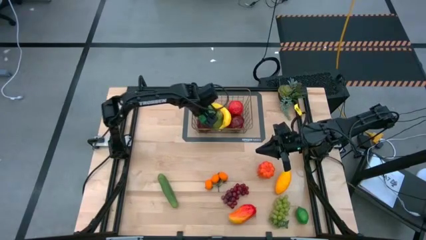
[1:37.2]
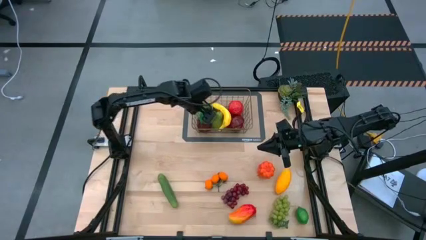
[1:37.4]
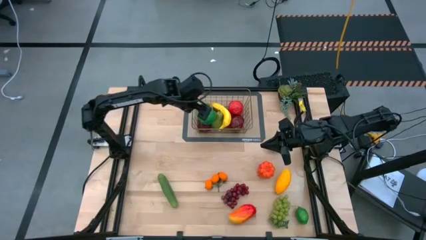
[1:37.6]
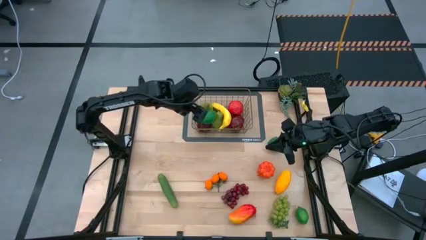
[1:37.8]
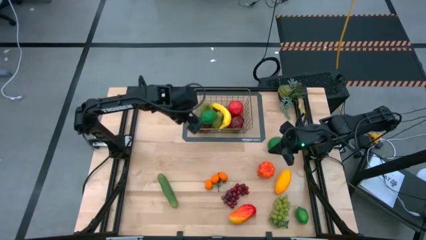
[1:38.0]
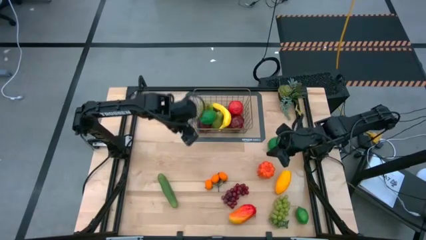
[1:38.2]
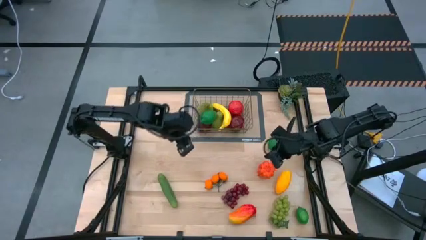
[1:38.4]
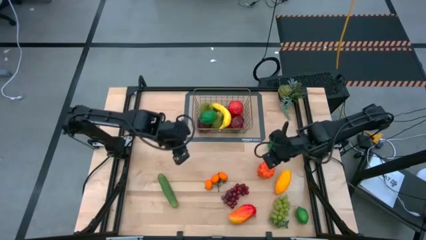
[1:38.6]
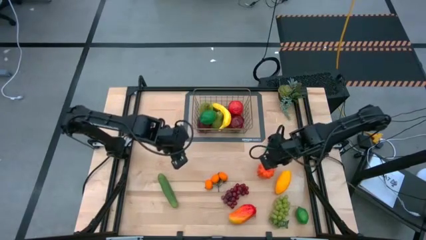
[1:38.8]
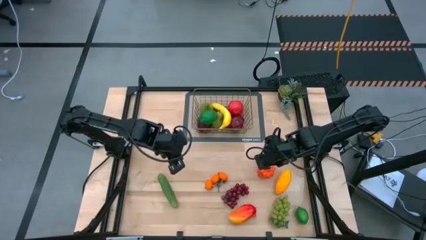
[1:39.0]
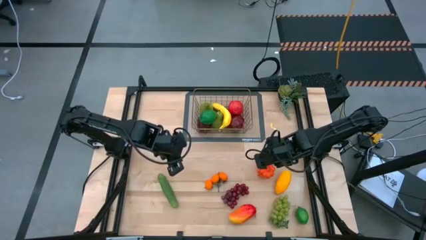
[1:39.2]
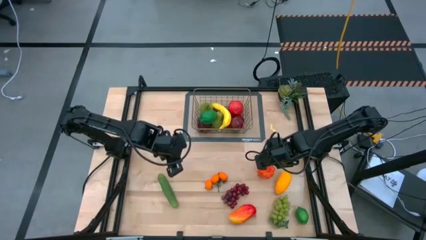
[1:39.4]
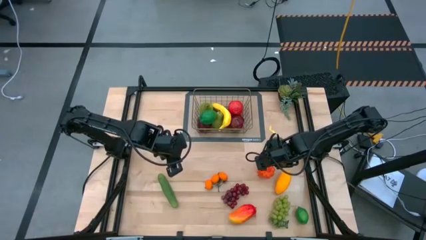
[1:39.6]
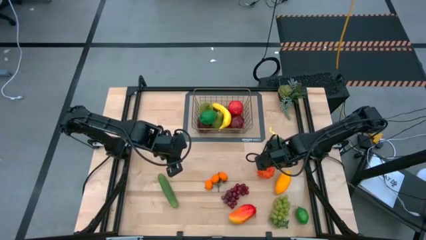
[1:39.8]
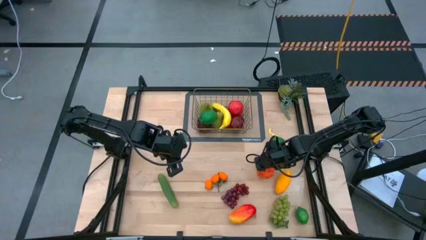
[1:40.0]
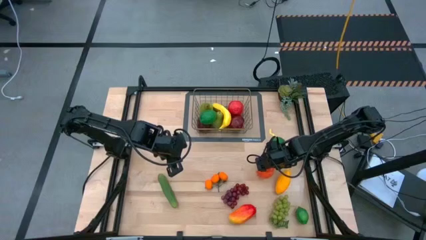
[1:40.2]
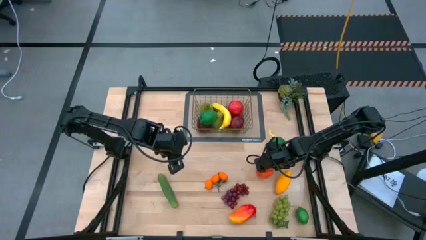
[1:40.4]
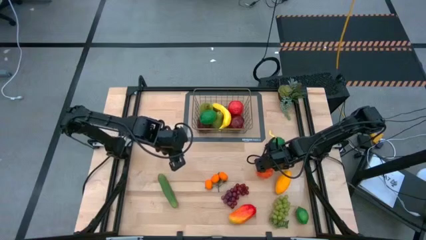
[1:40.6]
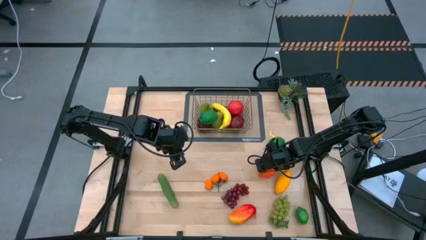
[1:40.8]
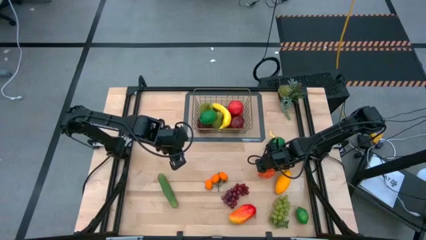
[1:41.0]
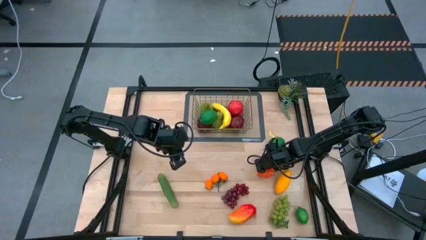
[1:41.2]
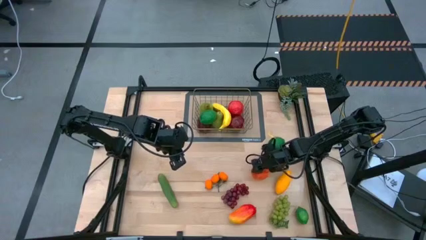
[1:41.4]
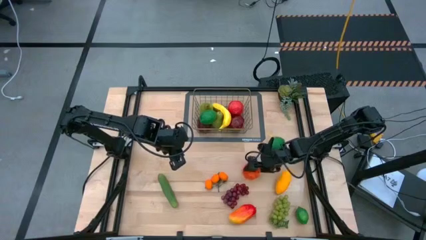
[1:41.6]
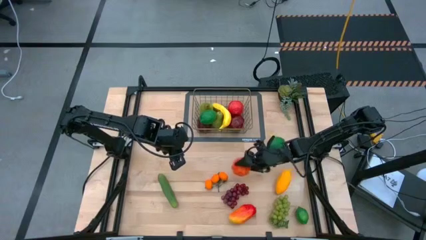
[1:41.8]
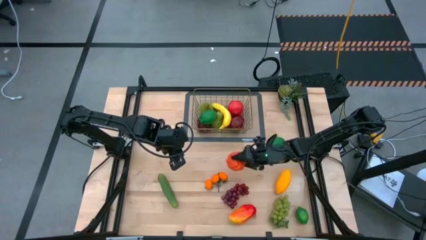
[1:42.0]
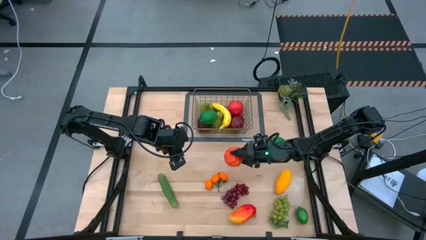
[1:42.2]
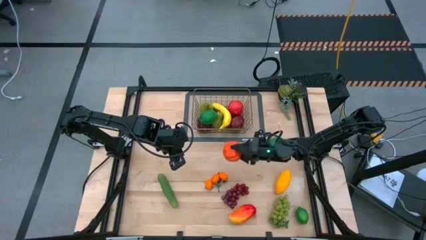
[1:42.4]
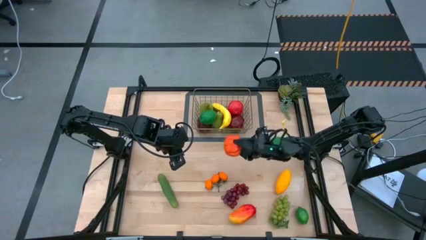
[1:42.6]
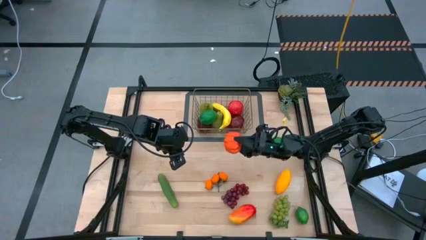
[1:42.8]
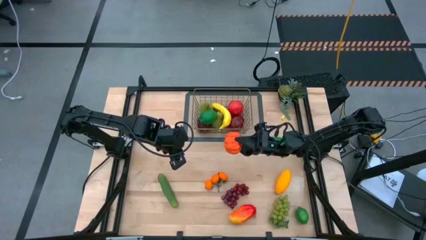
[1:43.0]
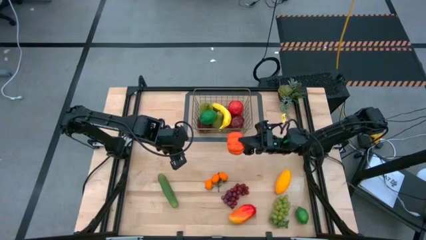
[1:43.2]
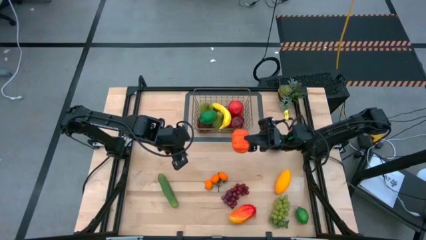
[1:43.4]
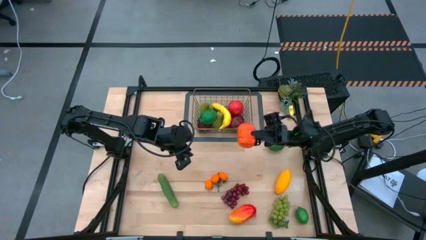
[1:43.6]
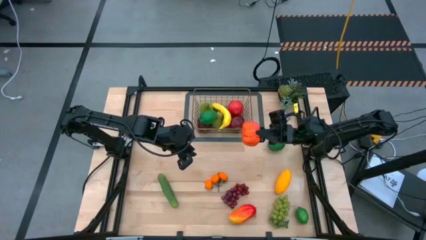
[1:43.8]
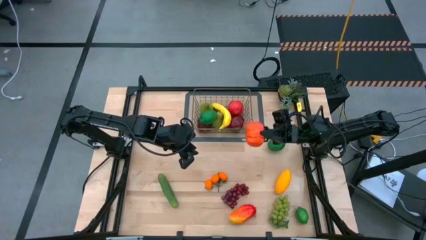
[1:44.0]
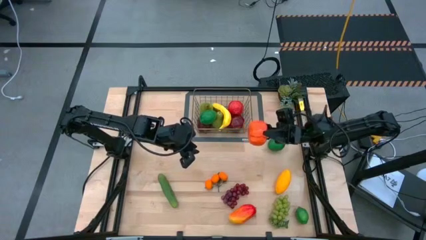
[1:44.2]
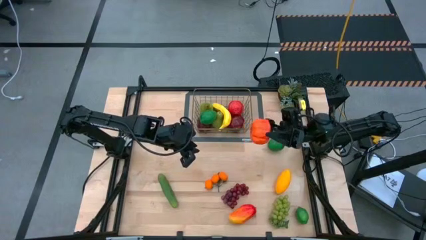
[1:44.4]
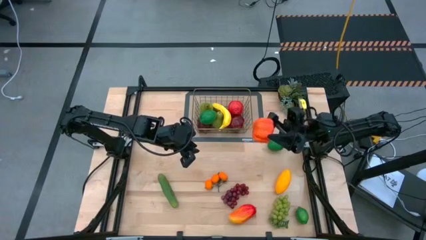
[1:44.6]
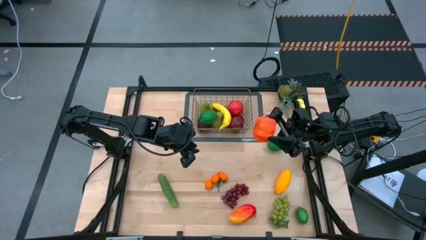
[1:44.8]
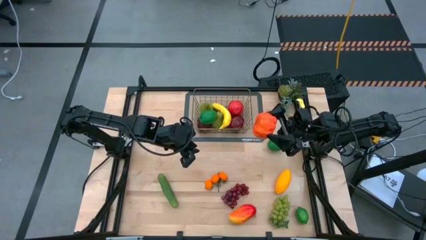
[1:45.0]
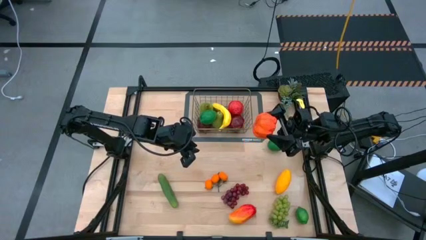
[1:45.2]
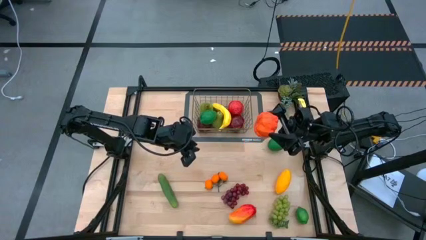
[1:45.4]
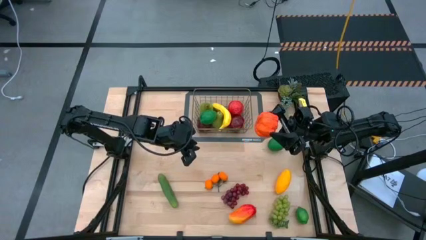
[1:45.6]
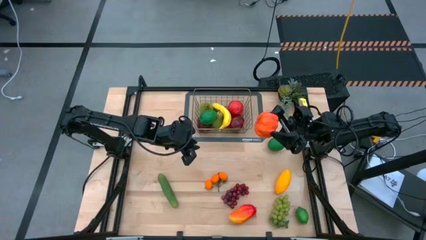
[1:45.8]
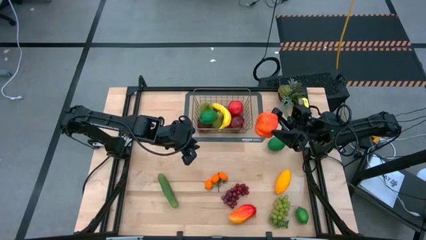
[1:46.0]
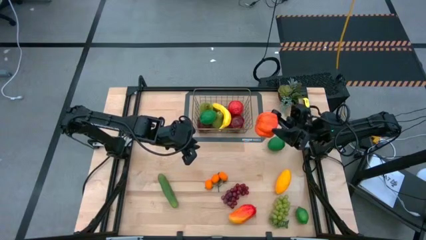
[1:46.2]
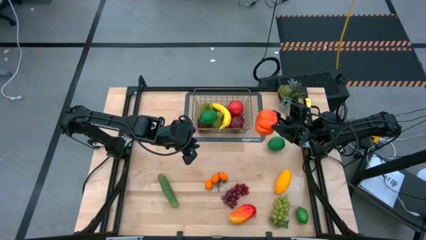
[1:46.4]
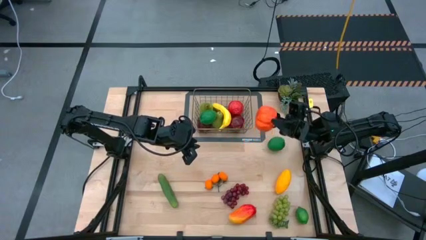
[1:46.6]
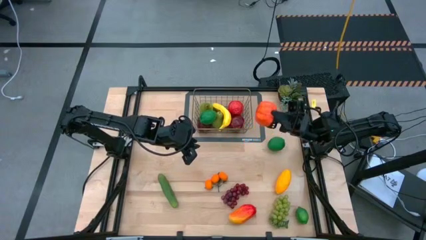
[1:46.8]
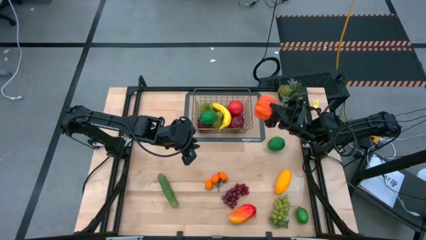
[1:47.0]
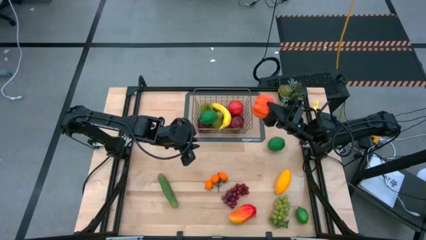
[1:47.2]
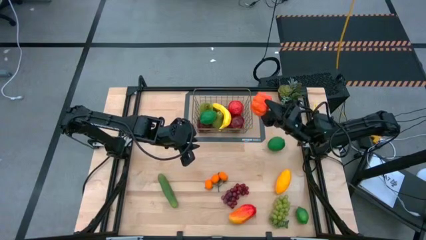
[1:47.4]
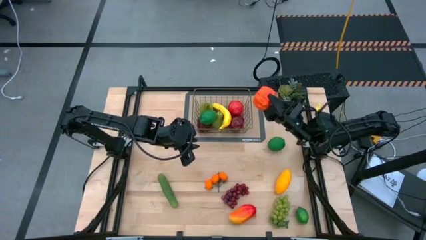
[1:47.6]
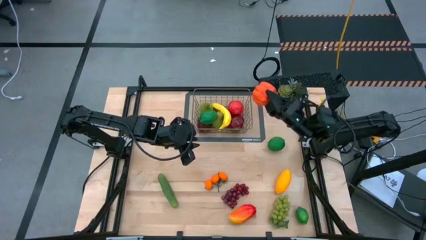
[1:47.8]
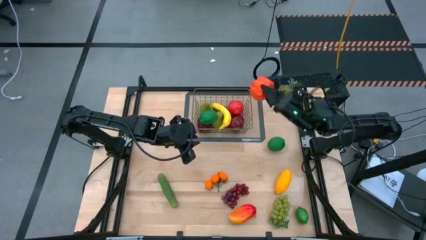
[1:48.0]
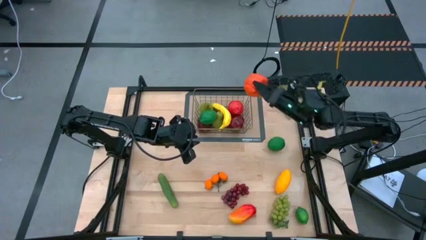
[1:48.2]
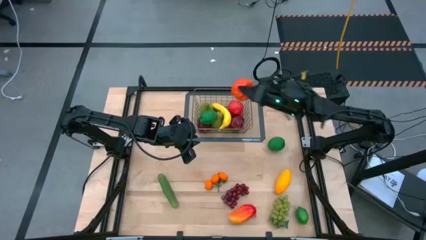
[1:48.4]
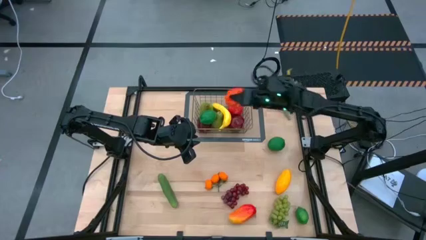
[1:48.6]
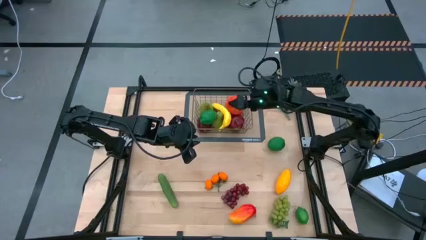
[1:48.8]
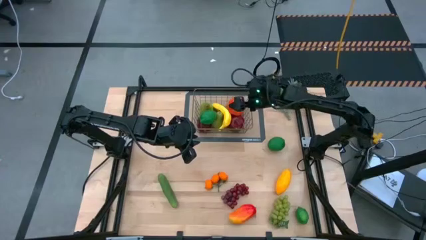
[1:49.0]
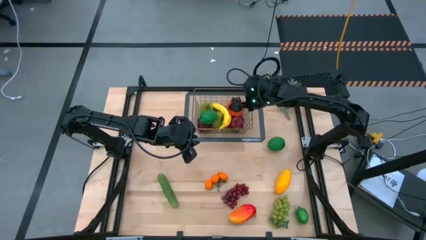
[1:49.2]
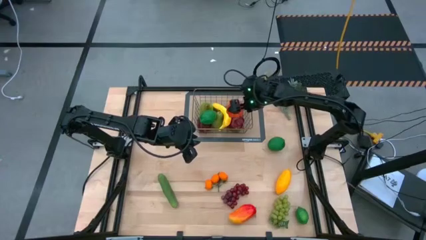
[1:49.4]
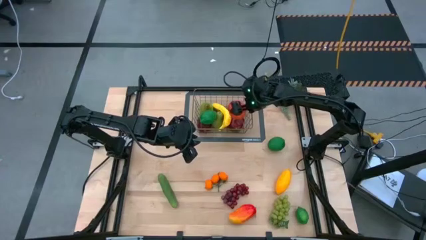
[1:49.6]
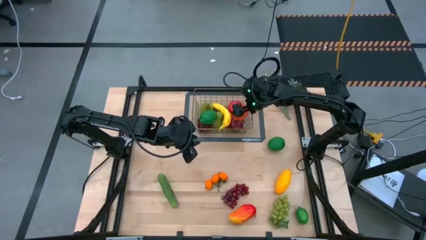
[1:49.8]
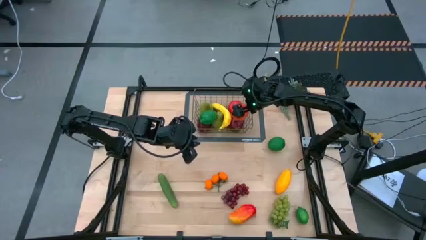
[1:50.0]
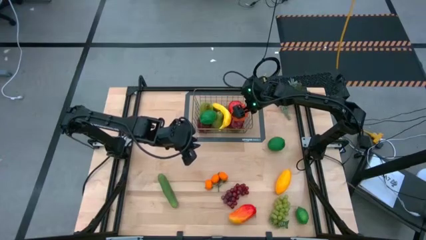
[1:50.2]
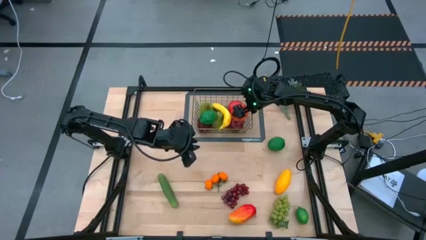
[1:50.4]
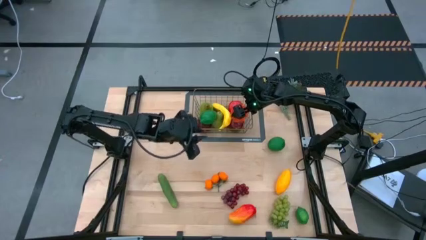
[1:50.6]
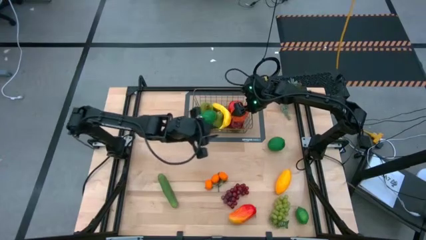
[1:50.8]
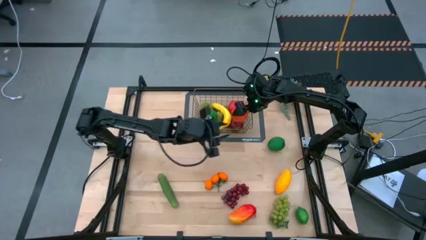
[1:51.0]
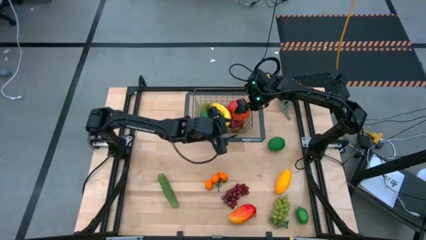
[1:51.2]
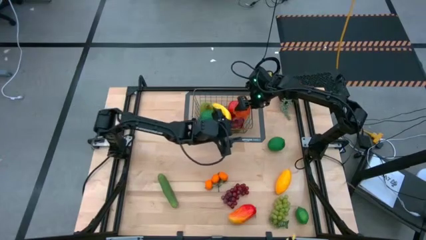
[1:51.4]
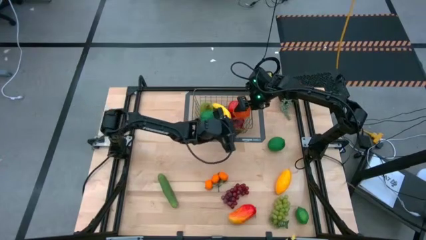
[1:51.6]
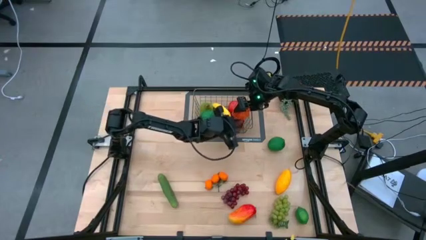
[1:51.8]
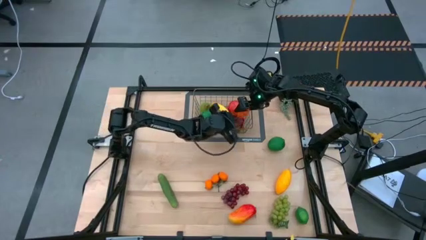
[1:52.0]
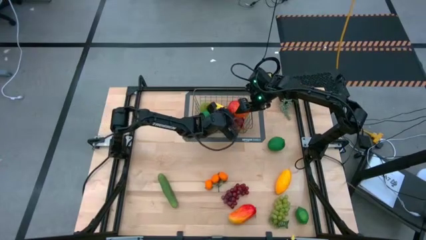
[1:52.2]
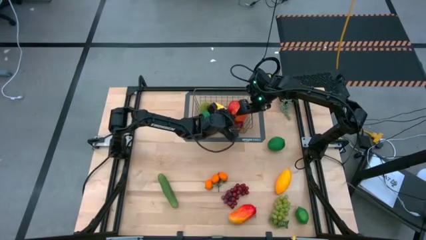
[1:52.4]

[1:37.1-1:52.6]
Task: Build produce basket
Put the orange tangerine into the brown wire basket

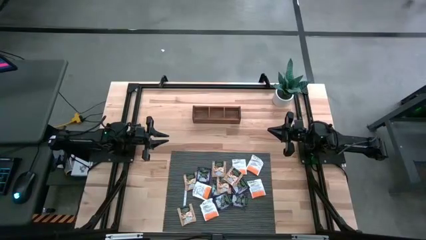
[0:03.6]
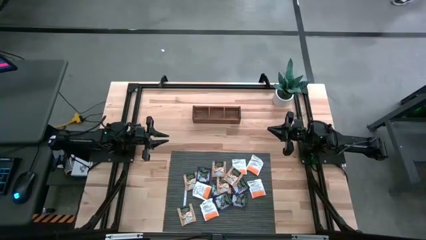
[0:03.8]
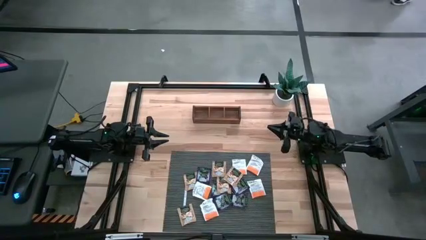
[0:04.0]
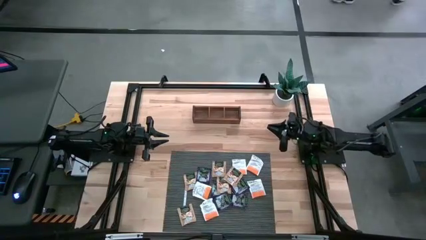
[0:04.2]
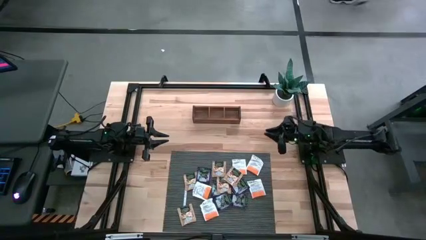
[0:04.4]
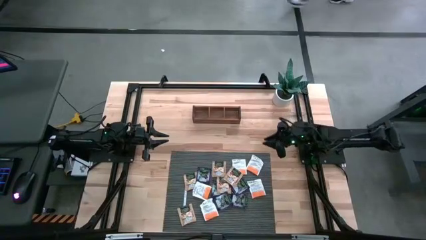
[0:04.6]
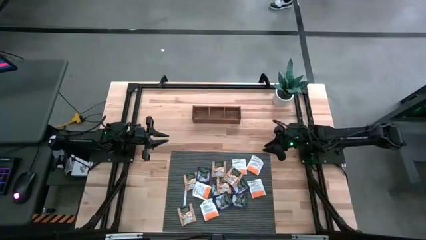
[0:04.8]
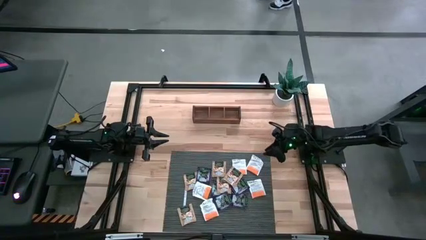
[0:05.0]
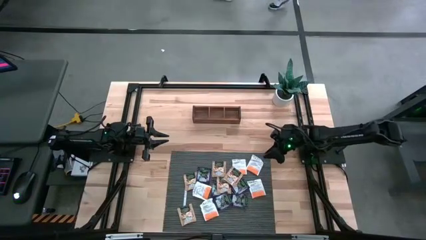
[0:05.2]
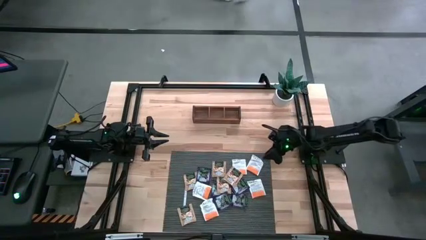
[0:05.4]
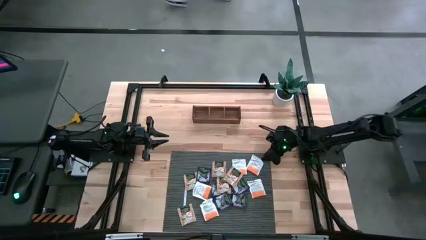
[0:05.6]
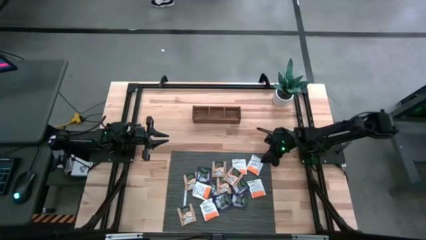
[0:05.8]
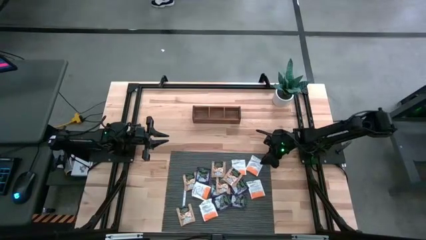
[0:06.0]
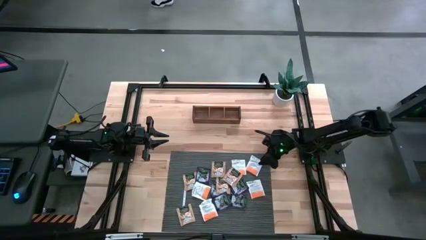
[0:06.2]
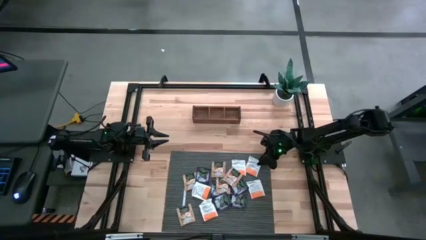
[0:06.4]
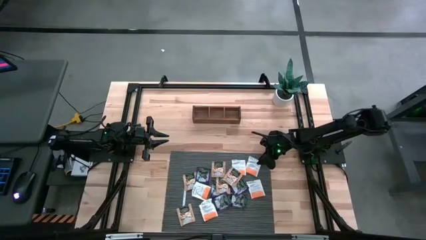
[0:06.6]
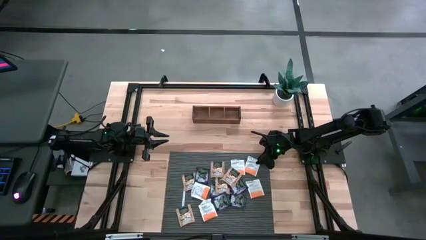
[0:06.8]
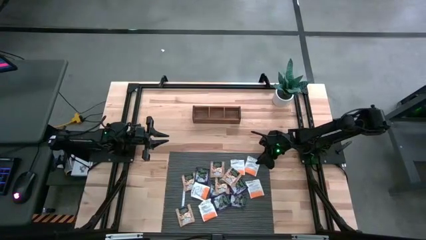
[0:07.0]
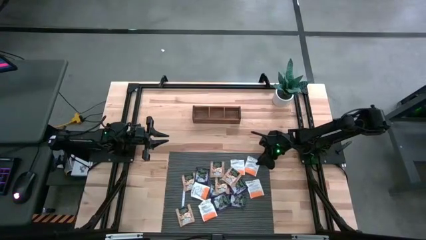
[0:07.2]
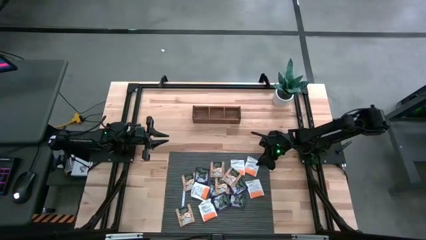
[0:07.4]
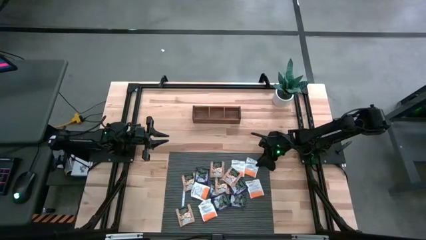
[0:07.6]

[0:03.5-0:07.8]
Task: Pick & Place Tea
Put the orange tea bag into the middle compartment of the wooden organizer
